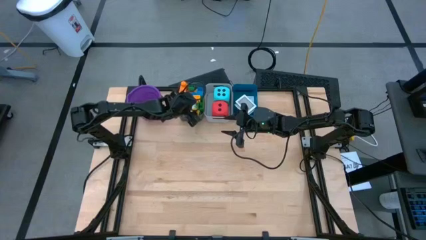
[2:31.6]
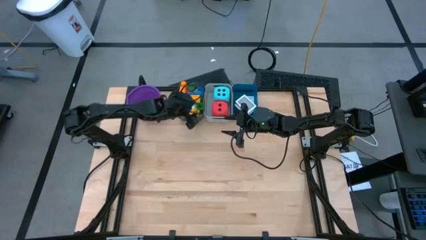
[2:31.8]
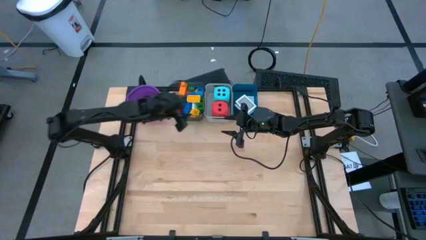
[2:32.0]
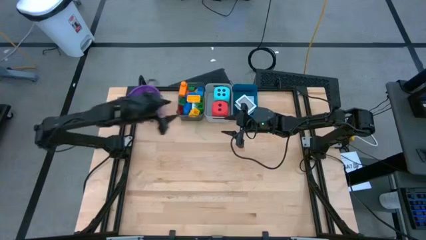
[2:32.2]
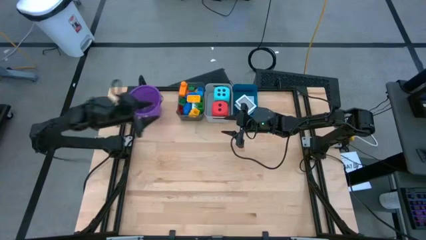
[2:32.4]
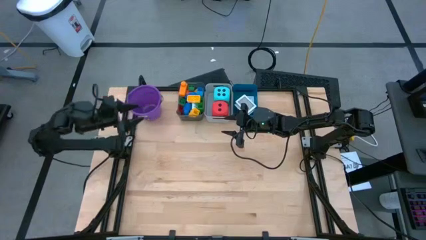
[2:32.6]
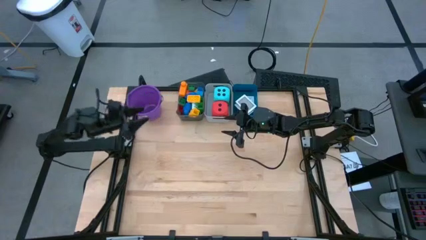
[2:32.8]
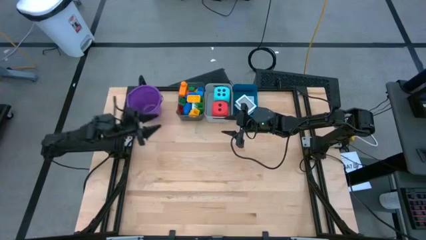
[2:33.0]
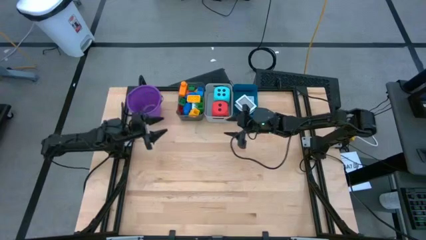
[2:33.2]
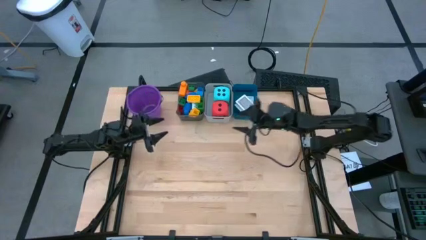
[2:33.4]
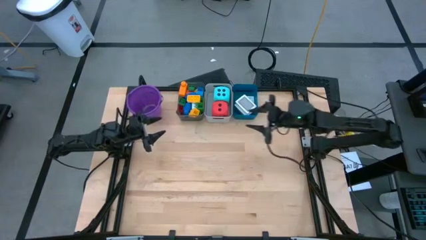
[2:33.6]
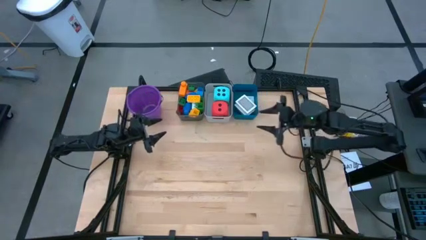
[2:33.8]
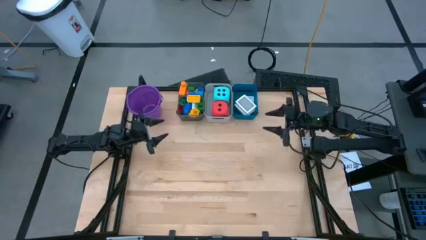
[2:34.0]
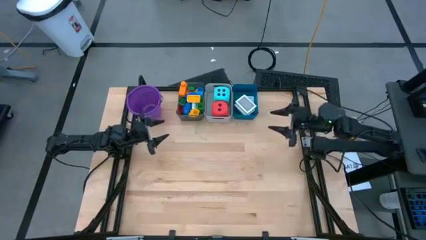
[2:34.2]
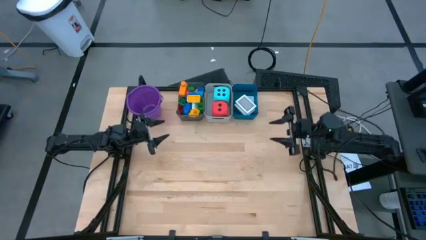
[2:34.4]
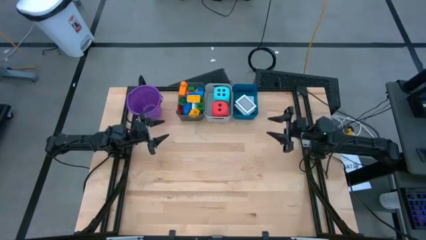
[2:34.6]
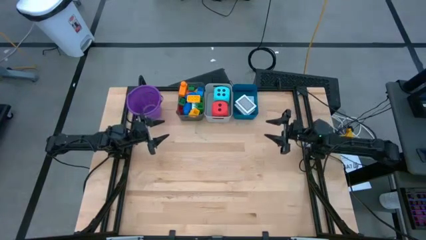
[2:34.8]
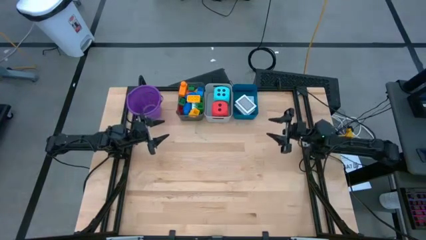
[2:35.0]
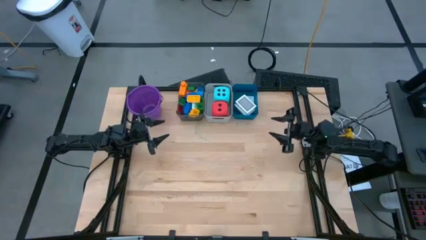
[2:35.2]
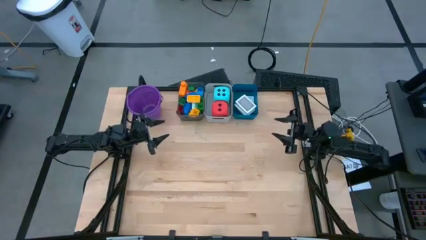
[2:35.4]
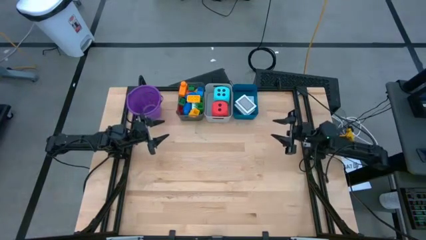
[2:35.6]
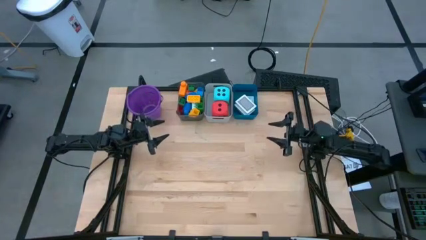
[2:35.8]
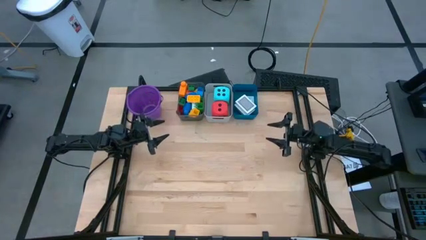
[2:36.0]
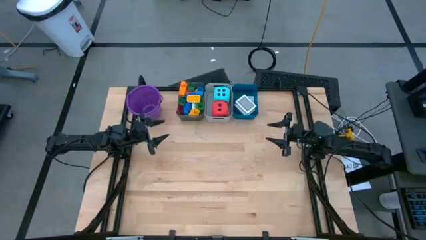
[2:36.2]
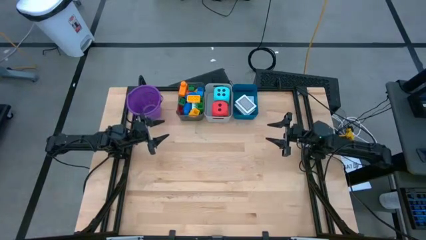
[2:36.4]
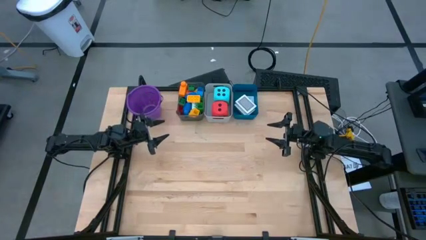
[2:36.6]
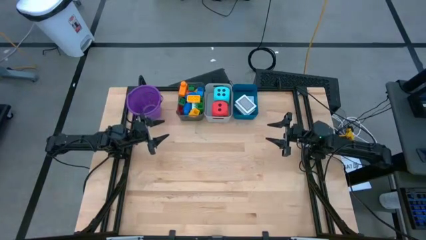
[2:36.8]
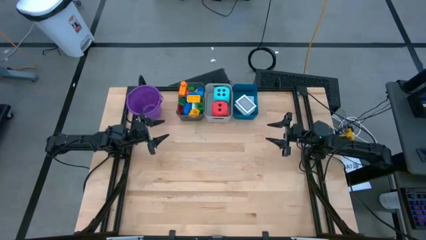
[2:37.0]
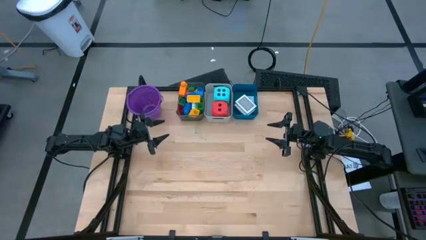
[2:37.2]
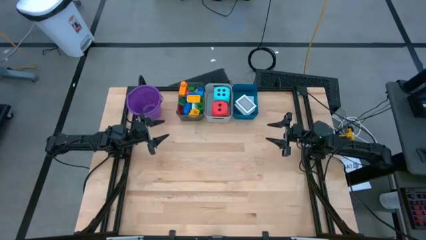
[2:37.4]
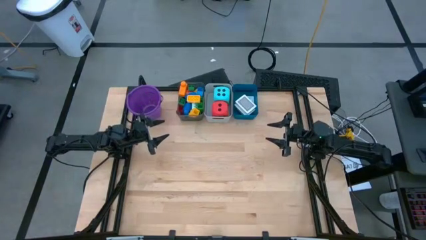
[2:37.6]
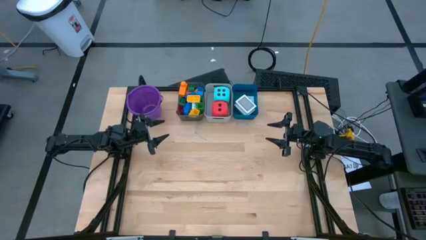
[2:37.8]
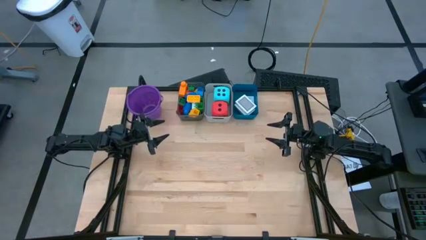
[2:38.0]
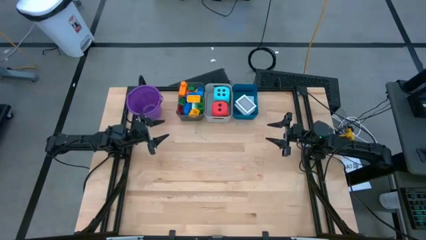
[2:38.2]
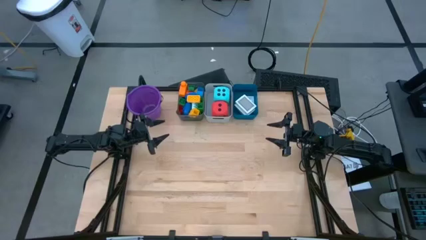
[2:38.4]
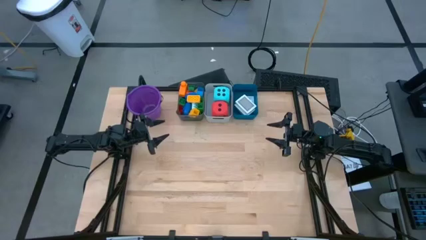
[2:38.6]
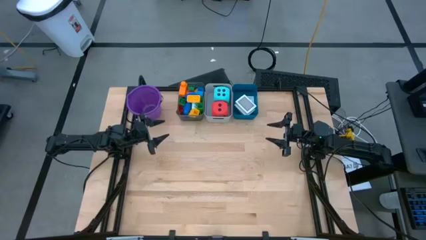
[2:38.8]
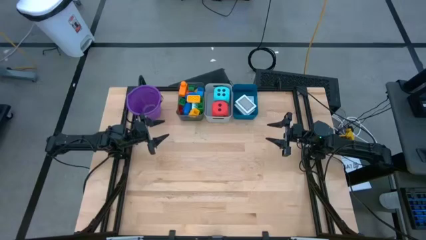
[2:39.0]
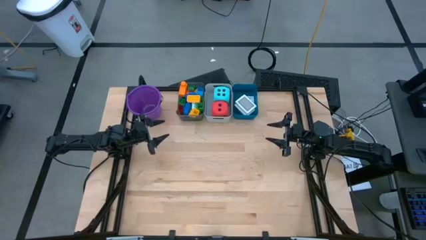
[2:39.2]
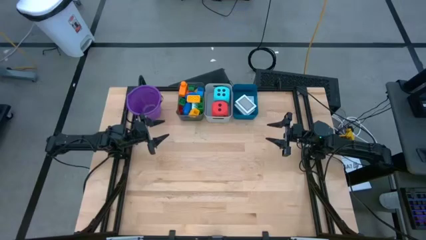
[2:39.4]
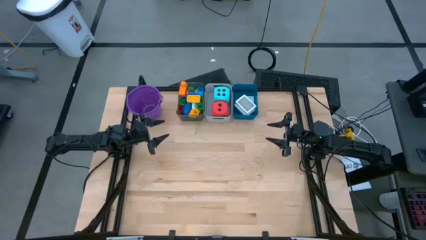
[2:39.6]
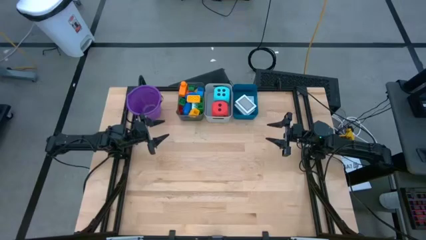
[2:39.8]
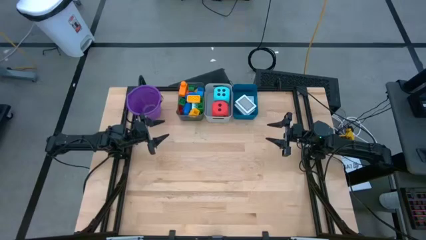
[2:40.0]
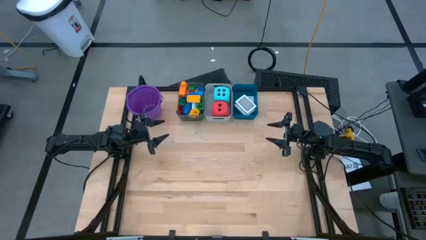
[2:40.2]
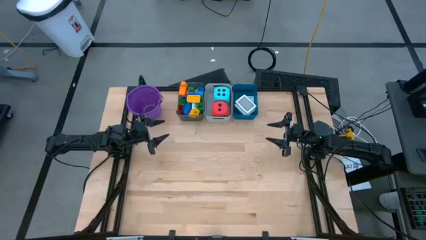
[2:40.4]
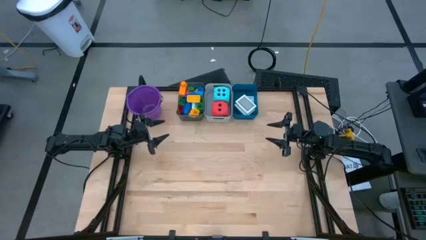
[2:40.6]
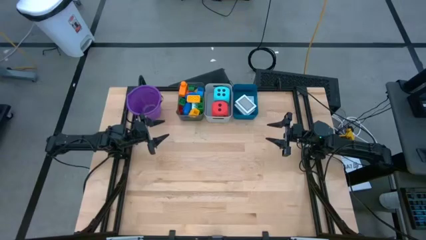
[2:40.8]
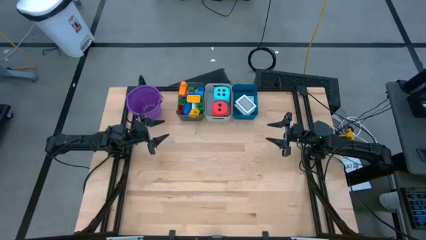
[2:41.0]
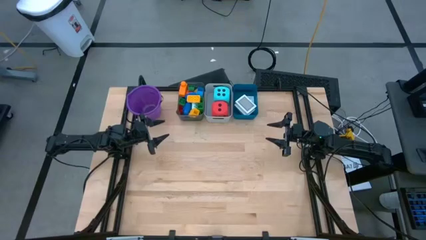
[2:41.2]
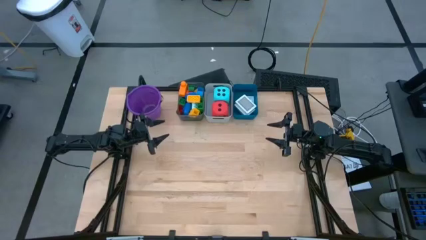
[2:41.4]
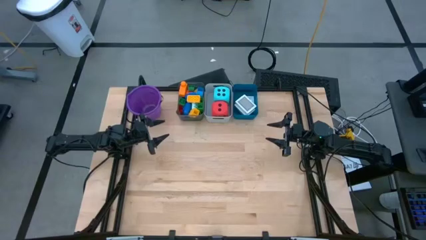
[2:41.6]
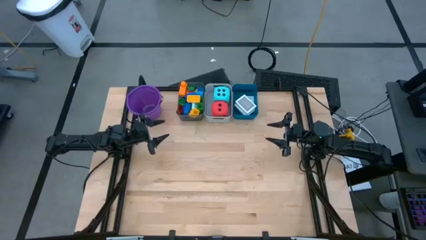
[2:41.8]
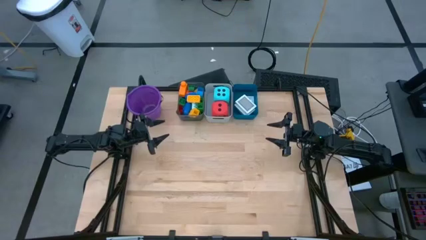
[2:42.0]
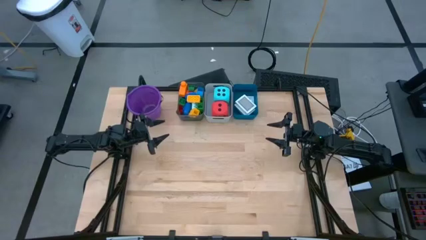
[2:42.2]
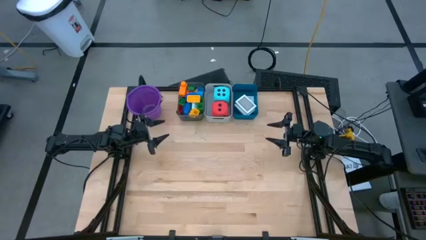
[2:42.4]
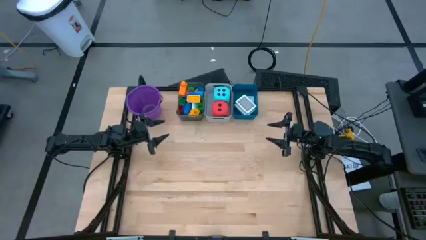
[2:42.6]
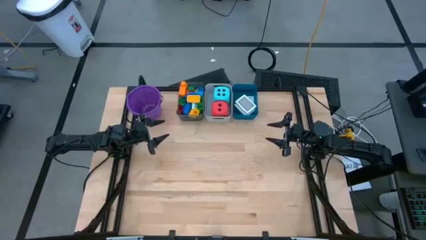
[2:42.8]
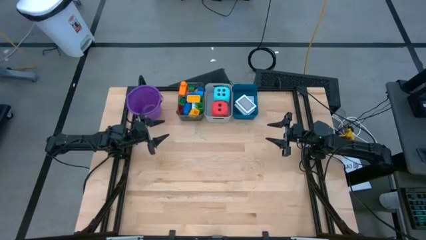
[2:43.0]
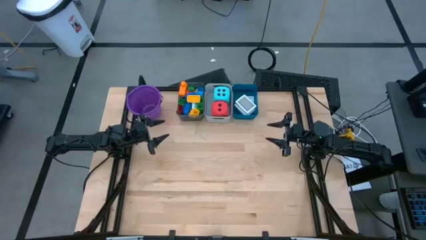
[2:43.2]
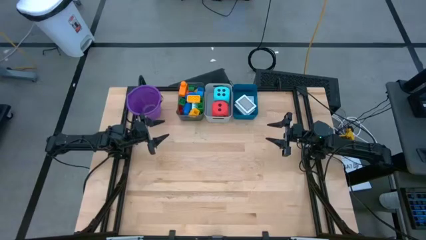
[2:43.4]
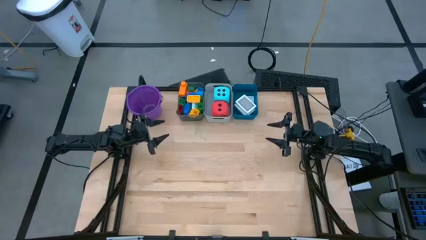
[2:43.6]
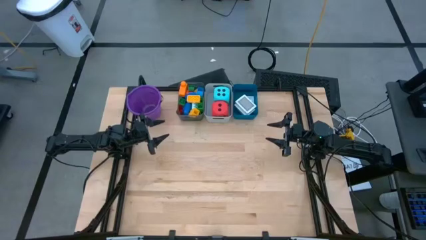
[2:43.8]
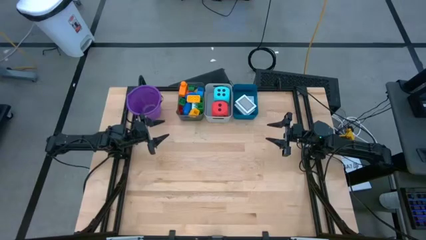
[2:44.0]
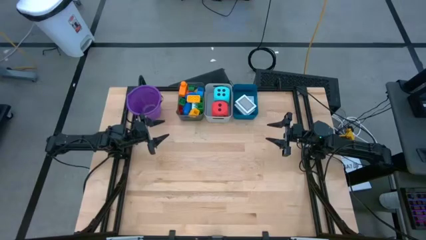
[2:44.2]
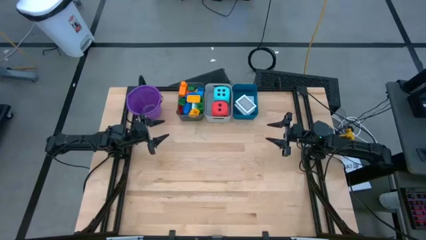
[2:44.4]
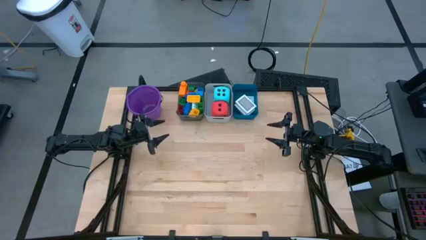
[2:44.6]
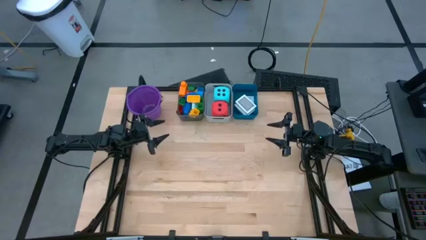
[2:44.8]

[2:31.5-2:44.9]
Task: Pick & Place Toys
Return to Home Position

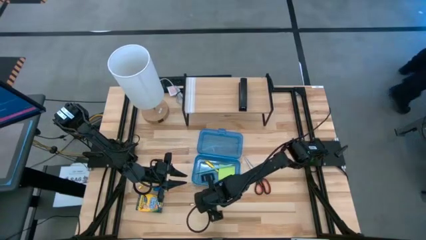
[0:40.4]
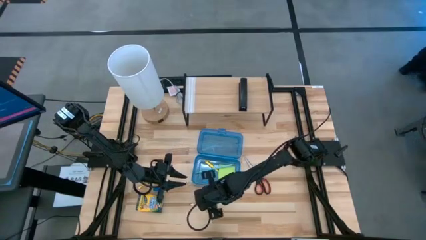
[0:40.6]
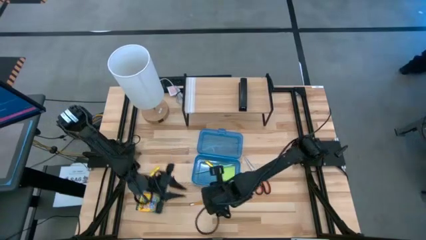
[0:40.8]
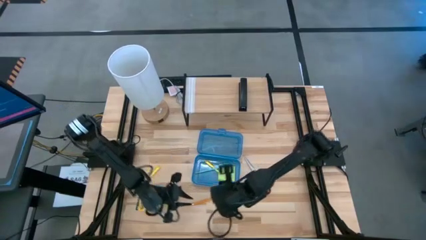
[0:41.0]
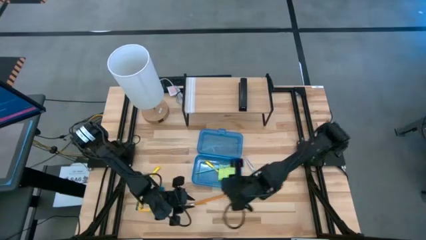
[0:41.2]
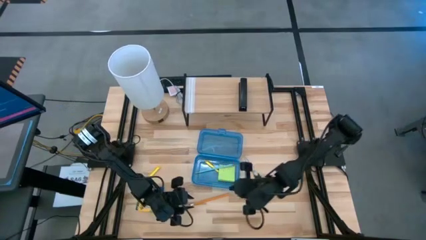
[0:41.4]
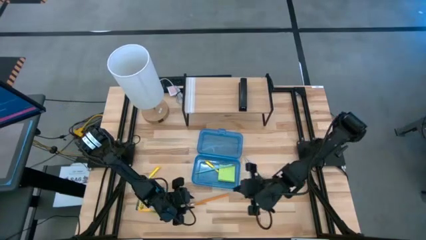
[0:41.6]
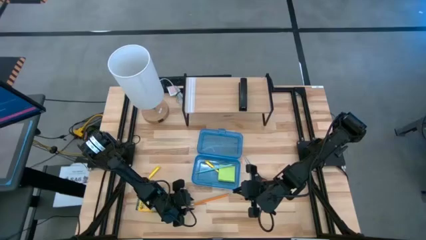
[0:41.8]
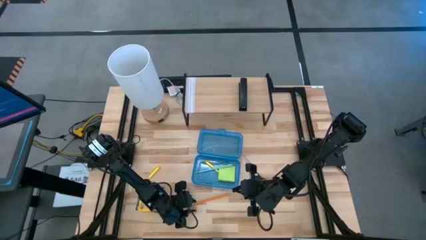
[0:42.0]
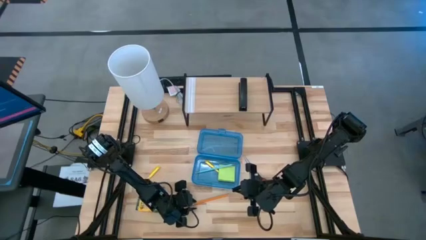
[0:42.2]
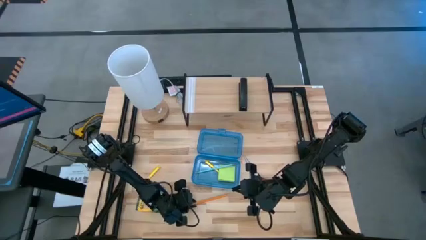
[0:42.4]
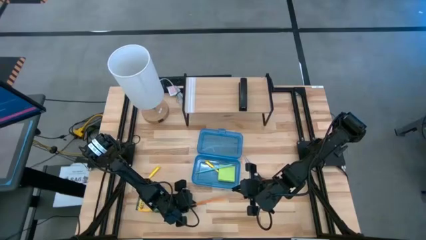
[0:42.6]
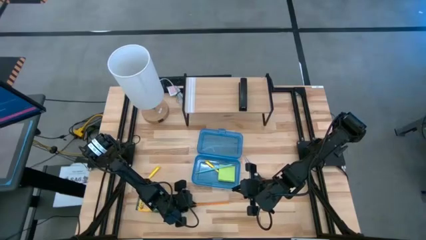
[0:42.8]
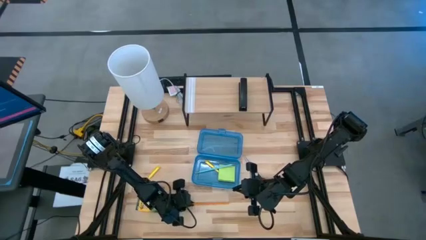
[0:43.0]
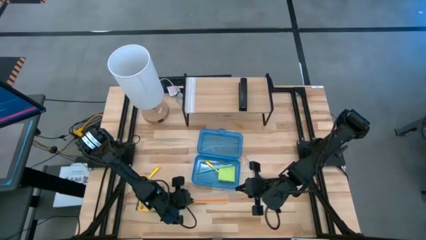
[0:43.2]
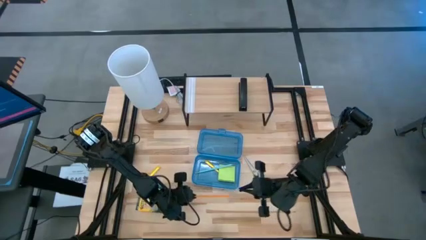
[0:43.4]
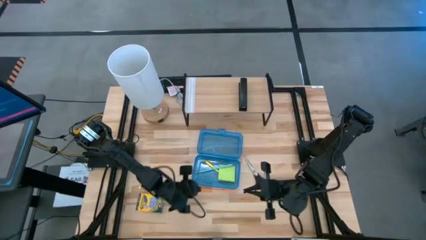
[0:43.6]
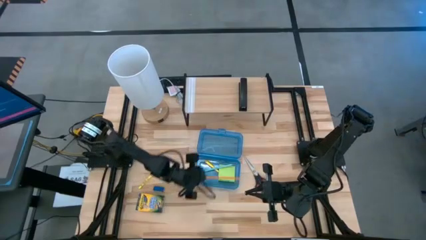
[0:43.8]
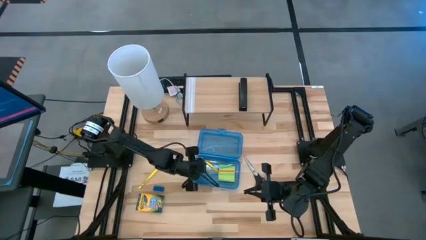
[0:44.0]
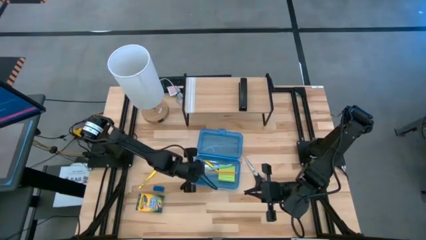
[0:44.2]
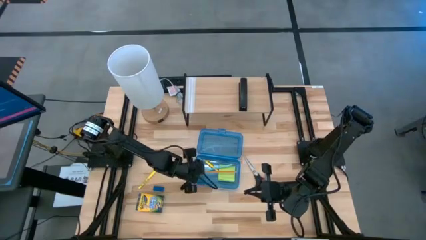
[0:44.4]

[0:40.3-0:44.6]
Task: Pack school essentials
Put the orange pencil into the blue supply box
